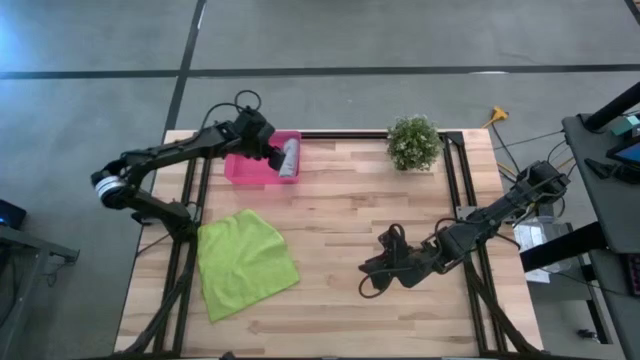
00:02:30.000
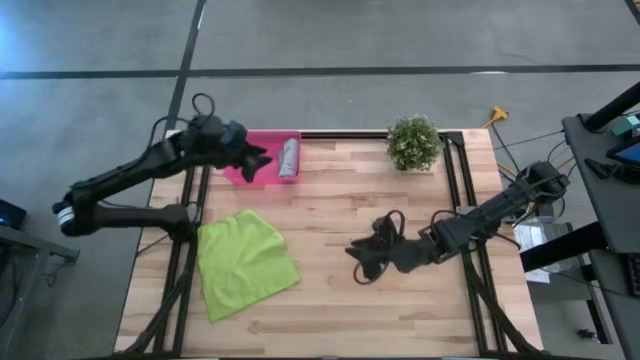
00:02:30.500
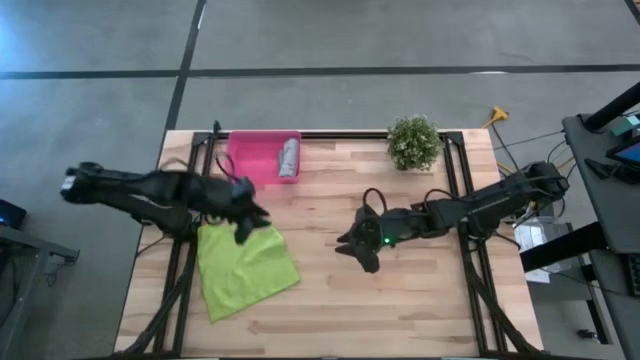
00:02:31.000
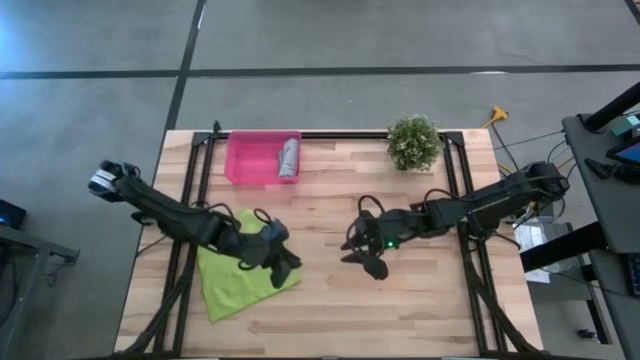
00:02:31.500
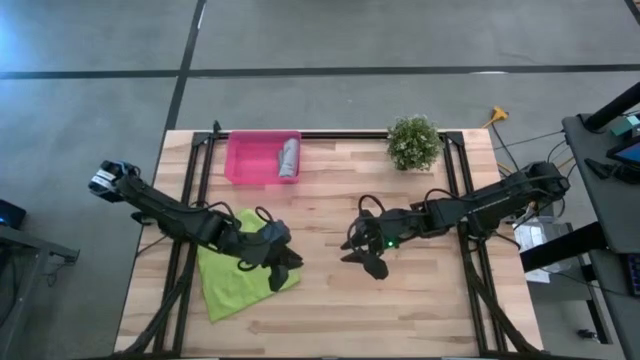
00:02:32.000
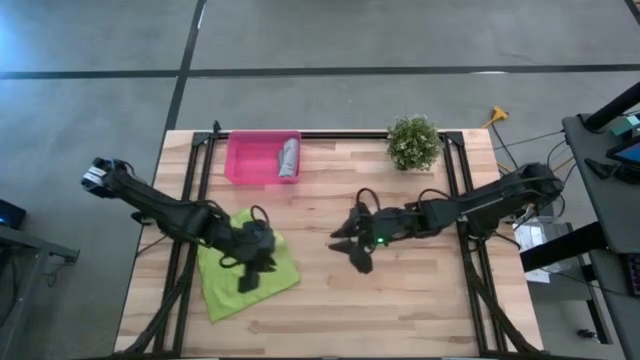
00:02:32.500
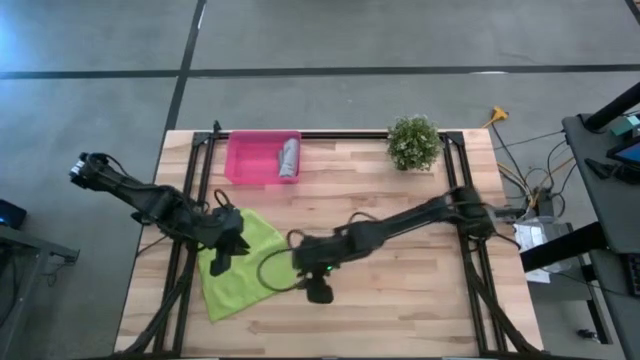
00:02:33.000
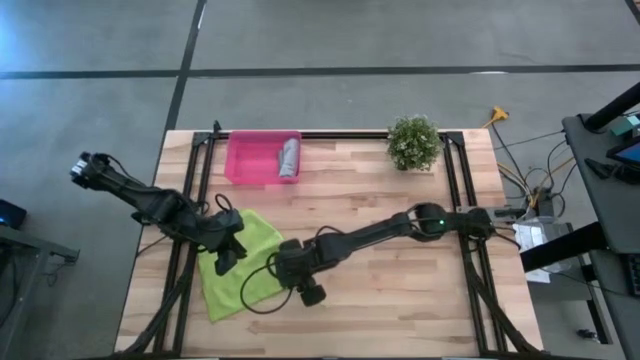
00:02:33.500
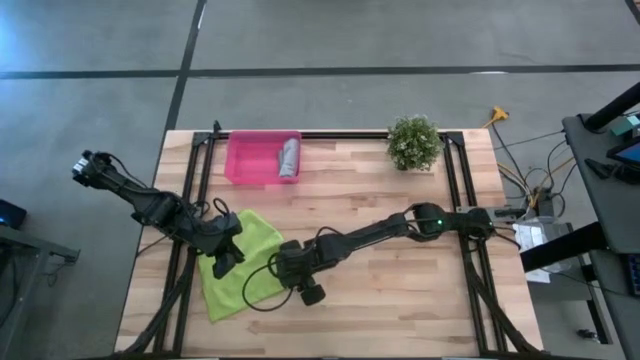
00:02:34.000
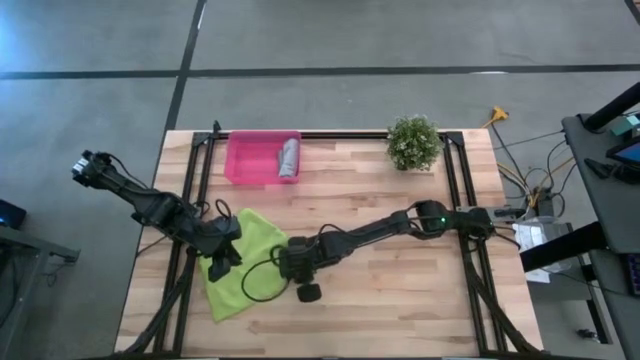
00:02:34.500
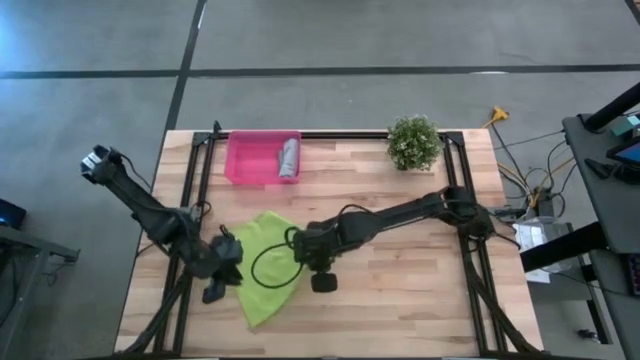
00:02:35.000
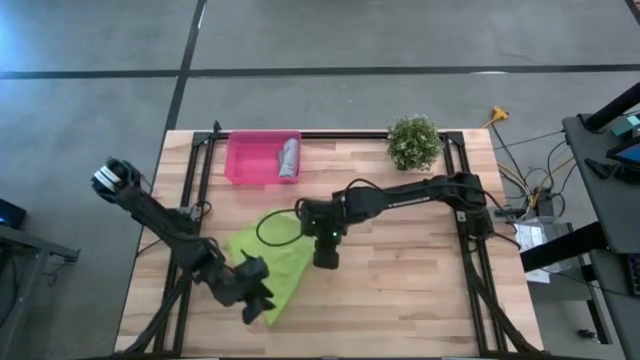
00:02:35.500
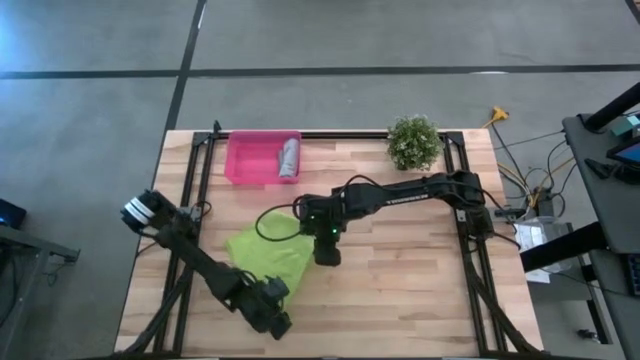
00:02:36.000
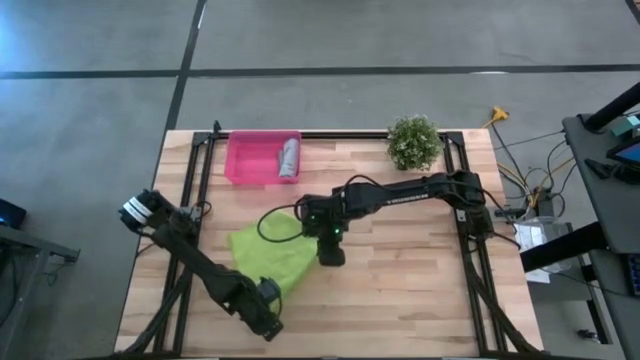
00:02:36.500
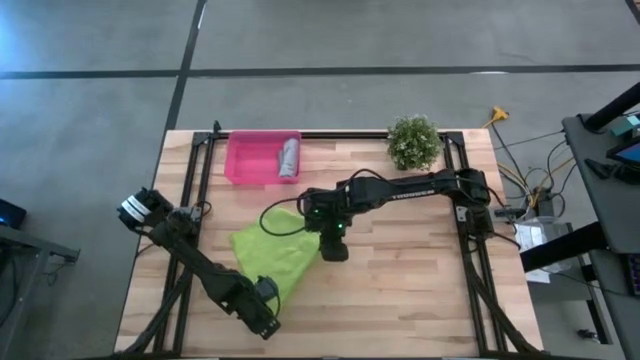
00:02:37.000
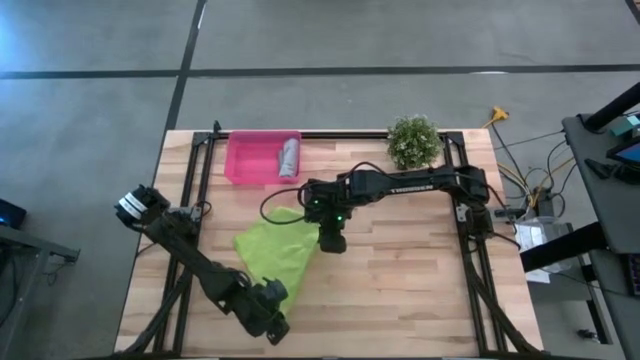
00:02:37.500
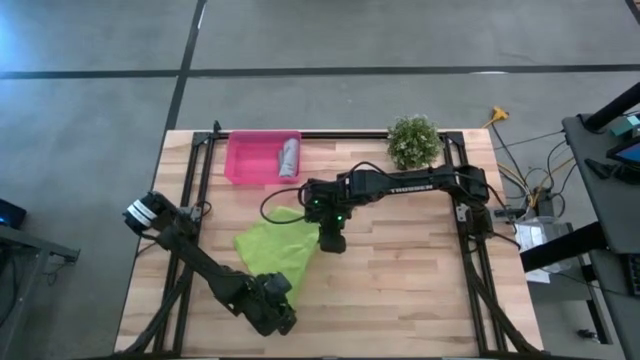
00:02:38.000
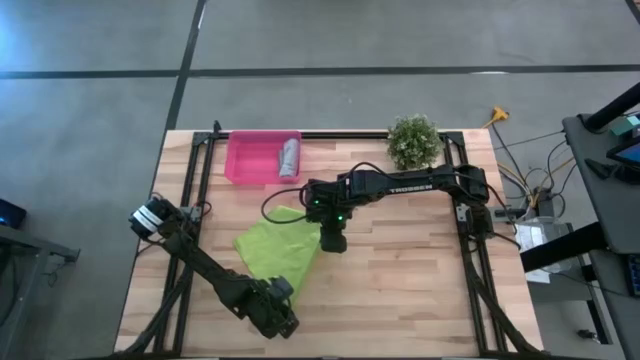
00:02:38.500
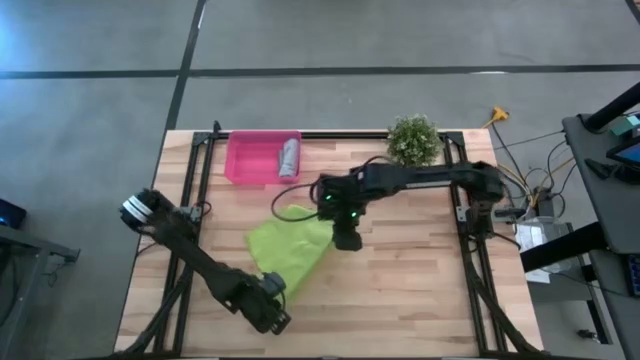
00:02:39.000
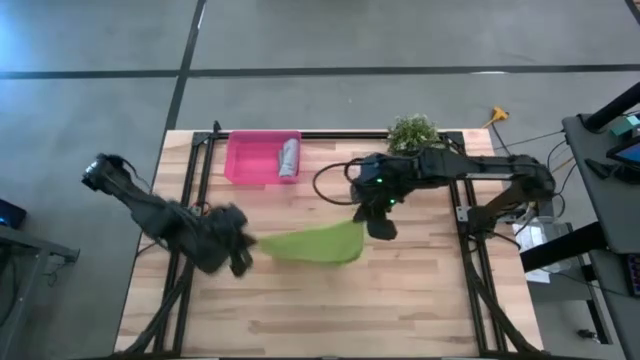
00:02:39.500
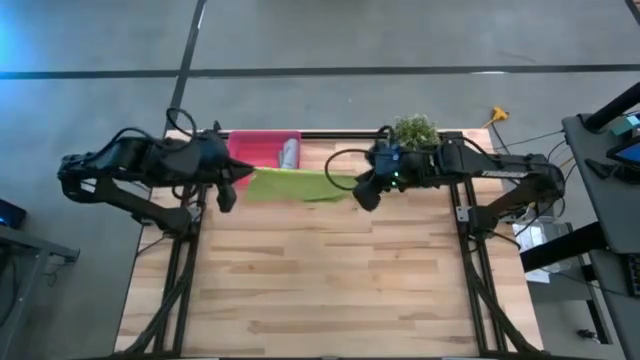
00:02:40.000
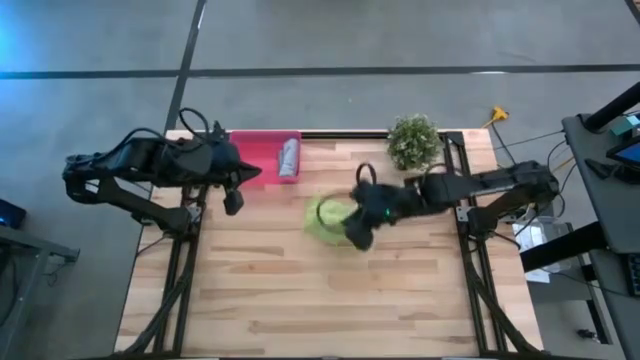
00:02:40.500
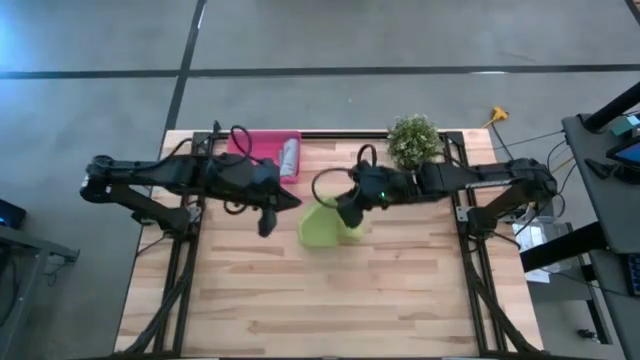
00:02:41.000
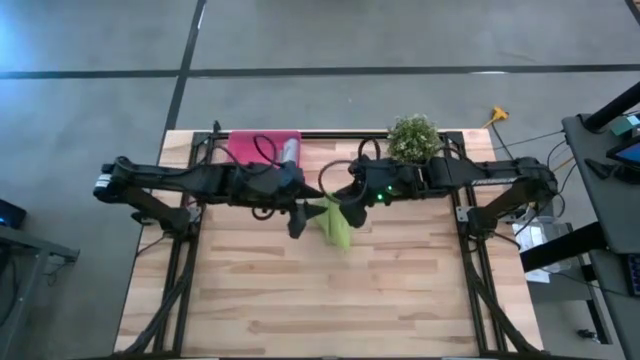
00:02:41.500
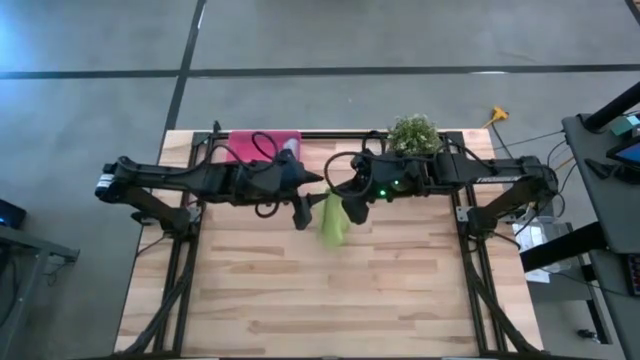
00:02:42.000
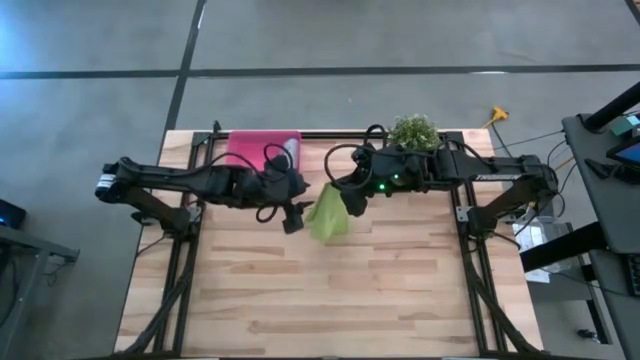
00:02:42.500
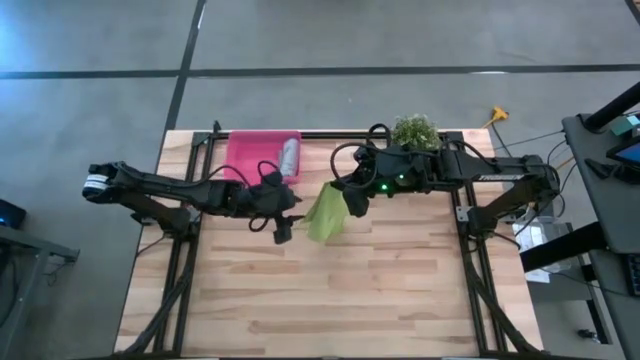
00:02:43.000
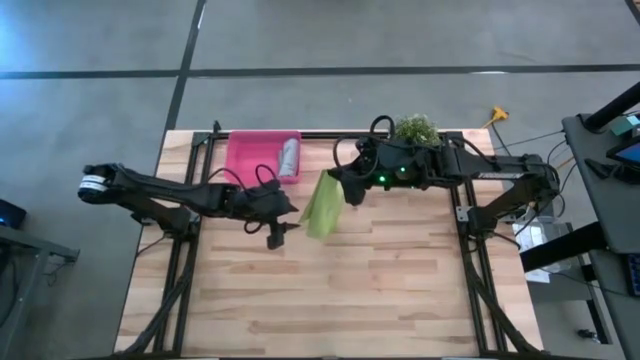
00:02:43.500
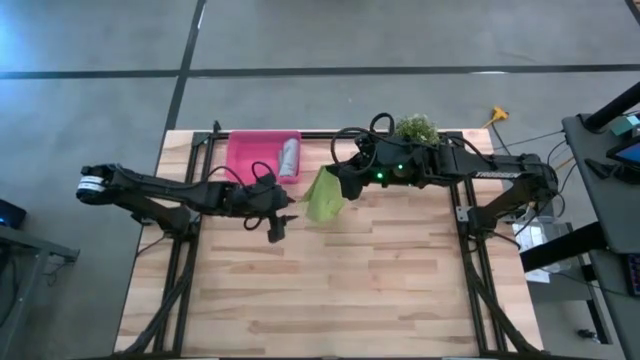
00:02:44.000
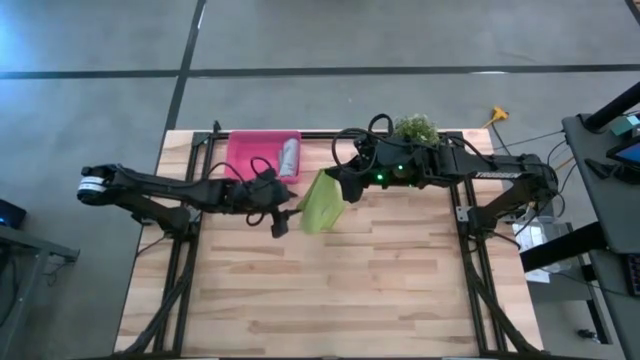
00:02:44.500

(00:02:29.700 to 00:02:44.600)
Task: Roll microfiber towels into tight, uniform cylinder then place into a basket
Roll the green microfiber cloth

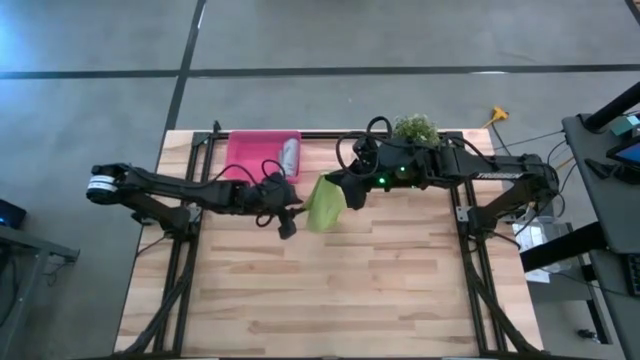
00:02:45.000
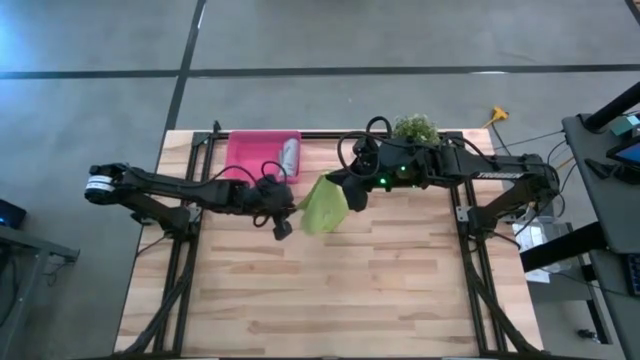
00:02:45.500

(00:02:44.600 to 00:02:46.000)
Roll the green microfiber cloth

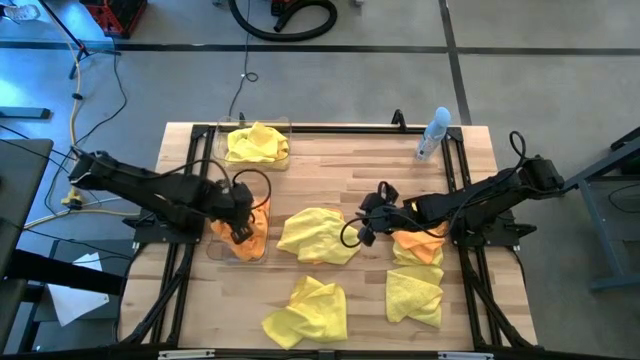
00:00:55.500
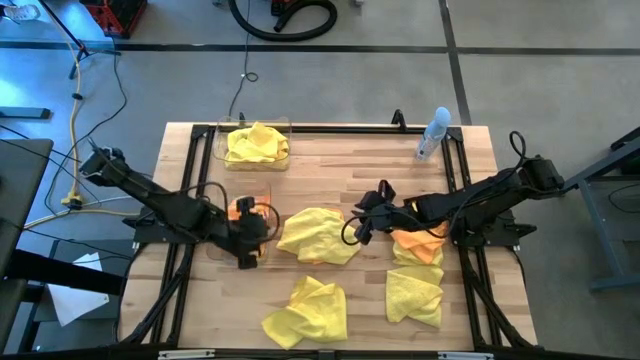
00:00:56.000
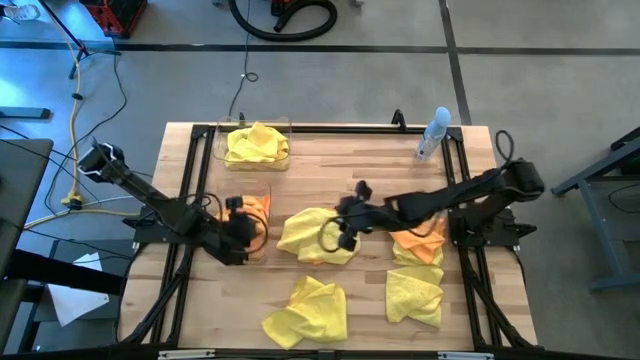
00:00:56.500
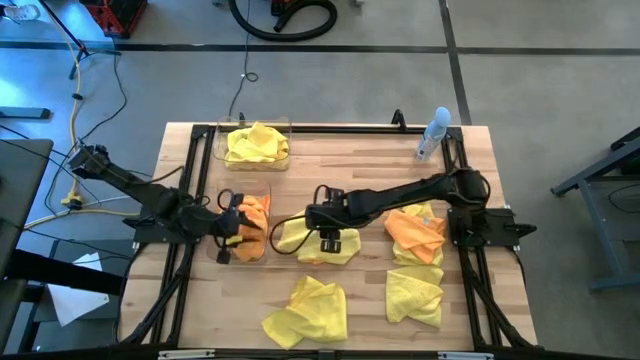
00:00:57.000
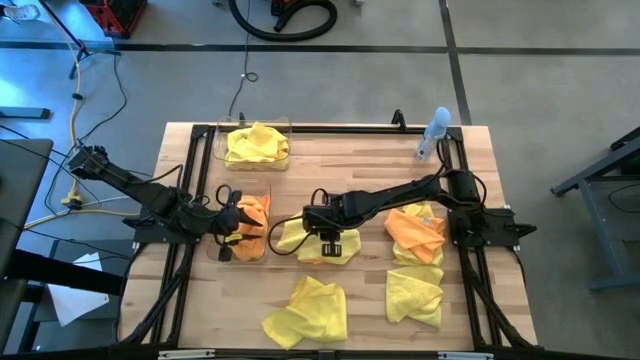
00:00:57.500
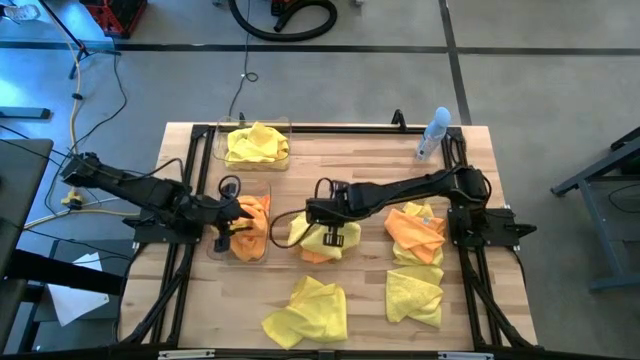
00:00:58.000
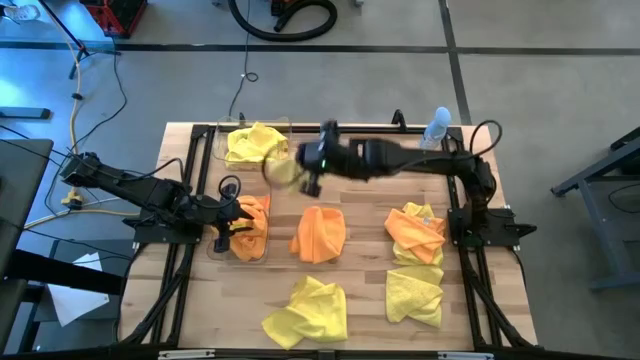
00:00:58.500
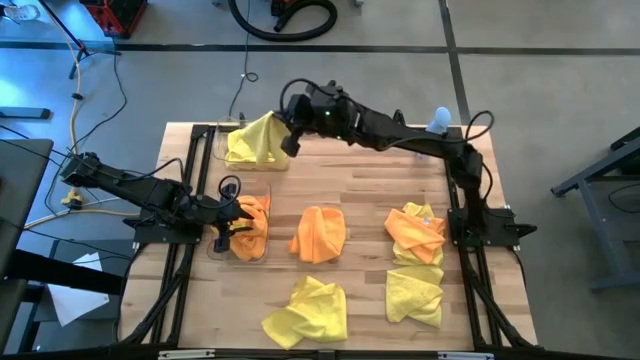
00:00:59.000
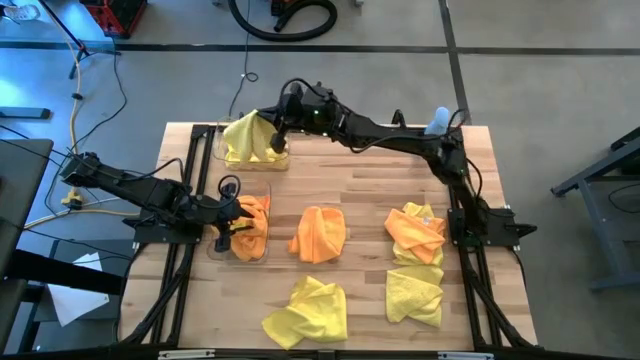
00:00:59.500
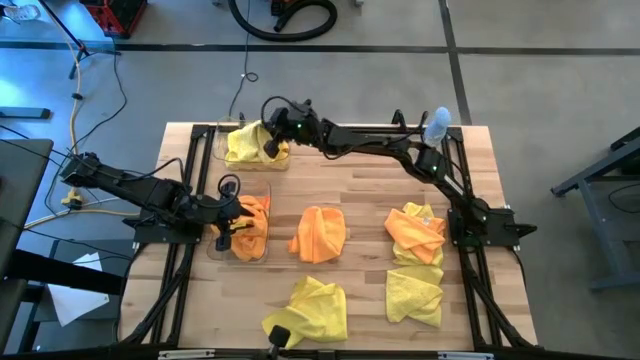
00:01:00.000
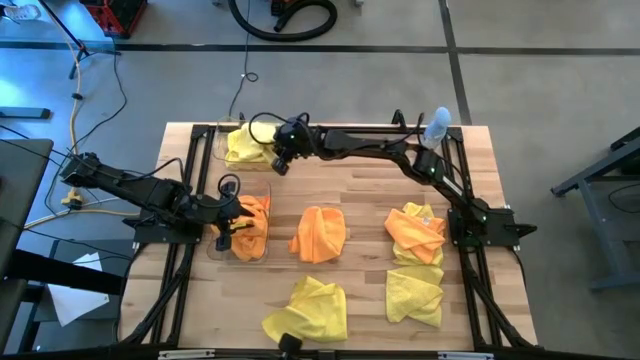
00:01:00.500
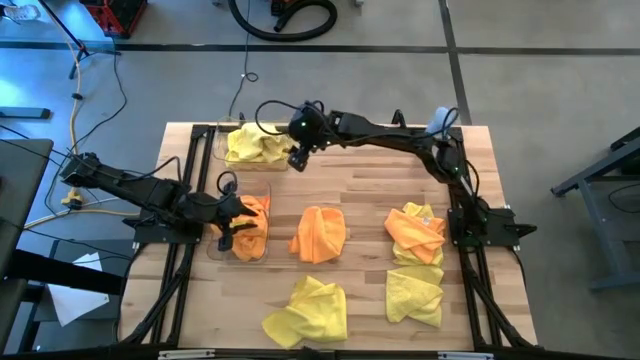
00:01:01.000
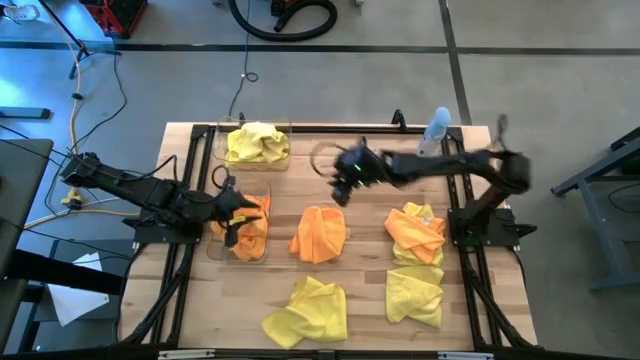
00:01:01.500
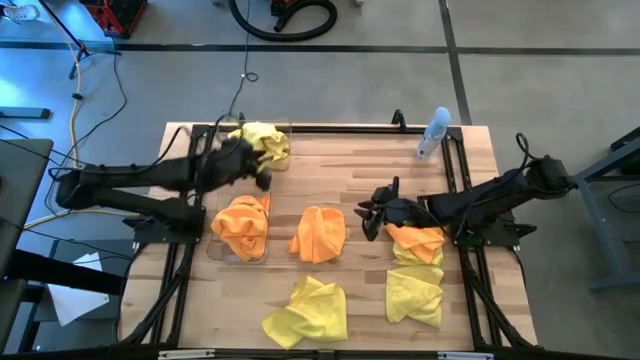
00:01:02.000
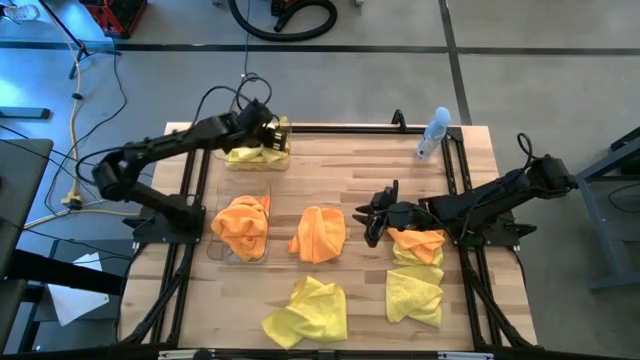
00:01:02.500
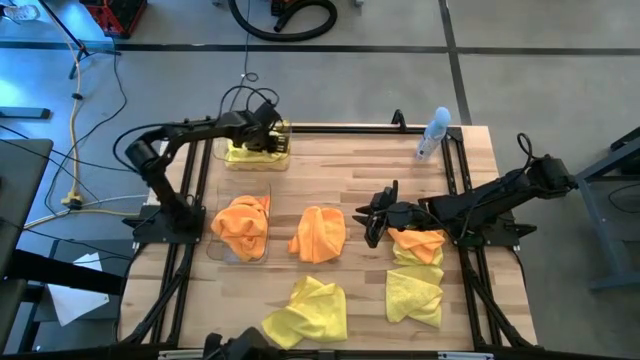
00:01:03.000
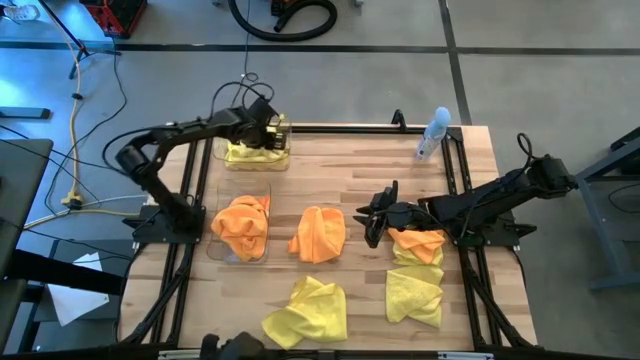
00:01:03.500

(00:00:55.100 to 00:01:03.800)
Task: Sort microfiber towel by color & place in baskets
Put the yellow microfiber towel into the top transparent bin
